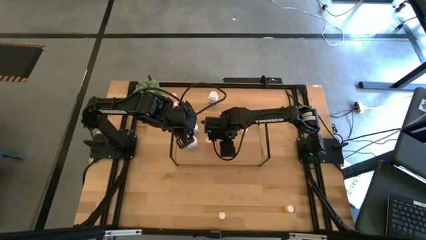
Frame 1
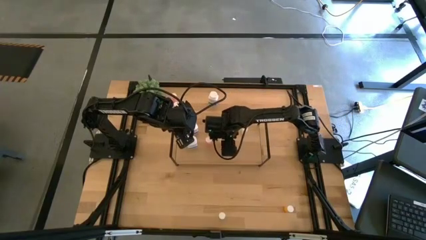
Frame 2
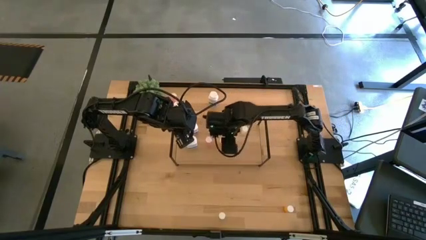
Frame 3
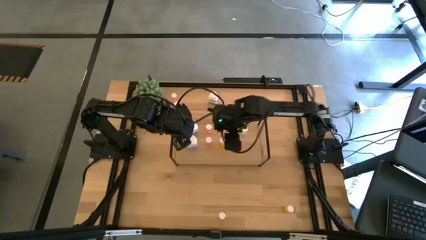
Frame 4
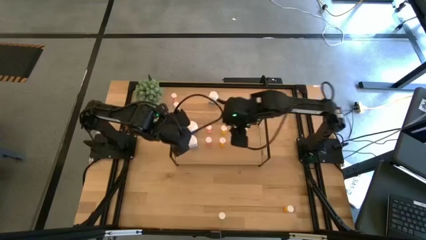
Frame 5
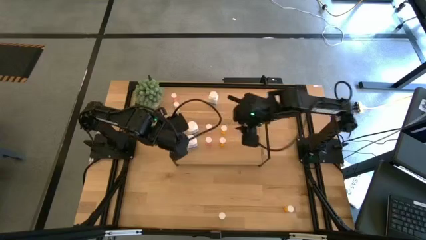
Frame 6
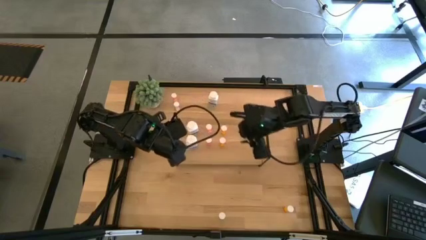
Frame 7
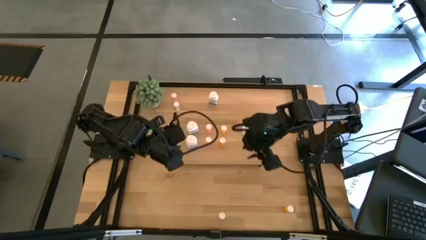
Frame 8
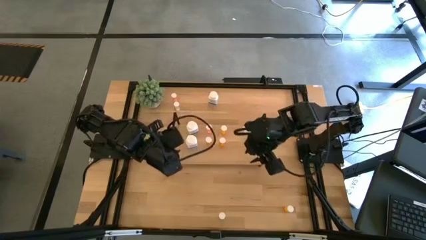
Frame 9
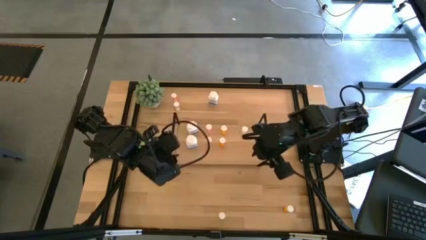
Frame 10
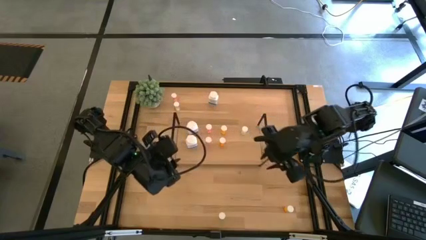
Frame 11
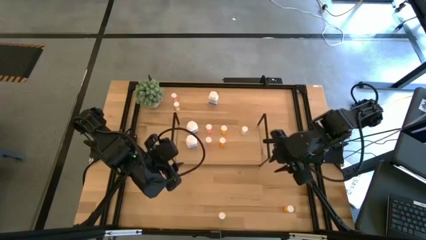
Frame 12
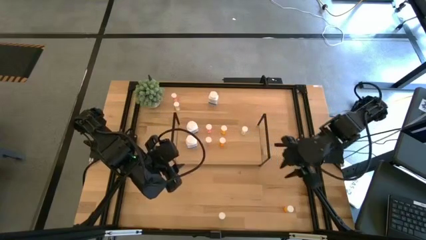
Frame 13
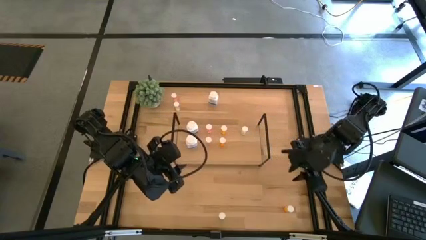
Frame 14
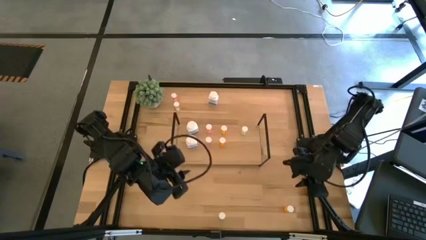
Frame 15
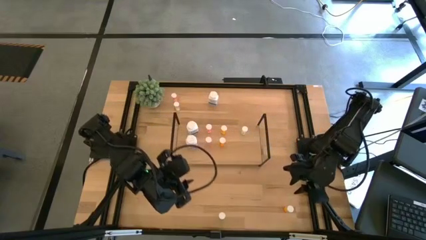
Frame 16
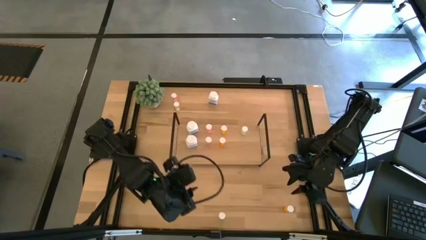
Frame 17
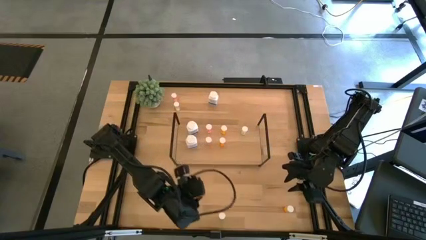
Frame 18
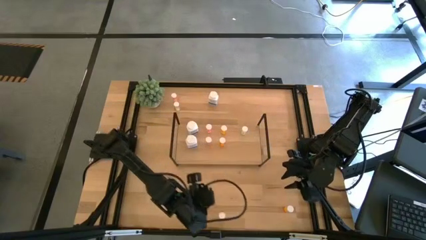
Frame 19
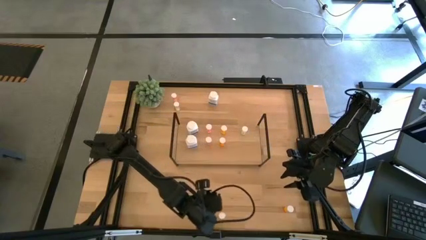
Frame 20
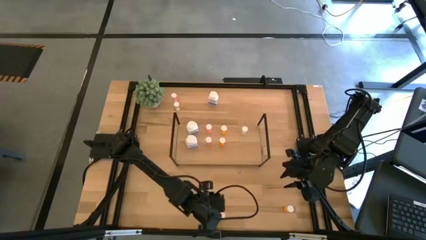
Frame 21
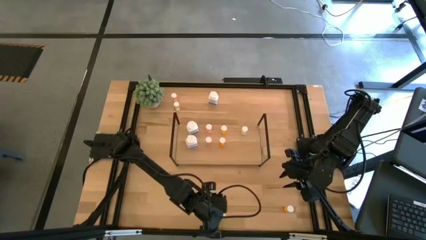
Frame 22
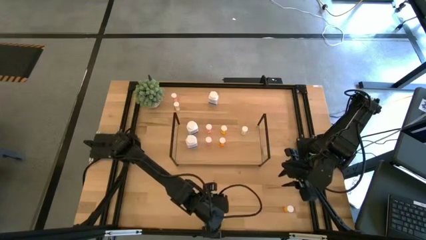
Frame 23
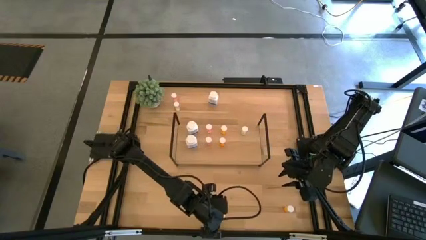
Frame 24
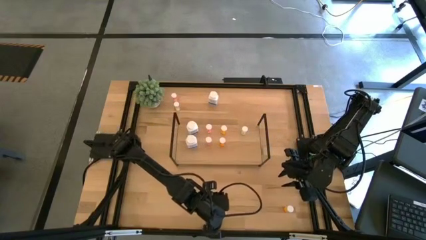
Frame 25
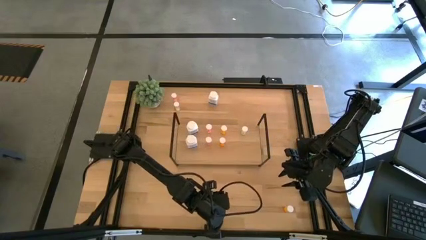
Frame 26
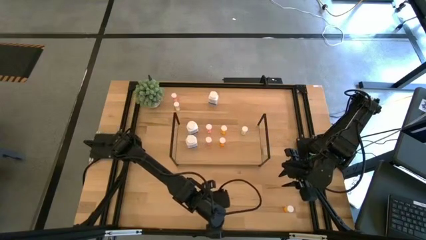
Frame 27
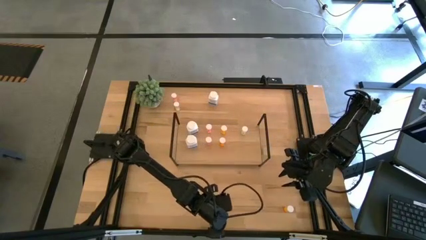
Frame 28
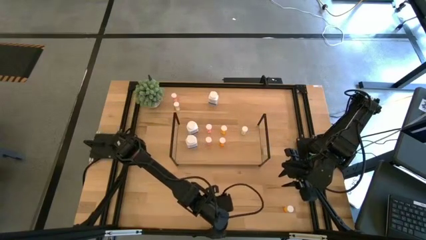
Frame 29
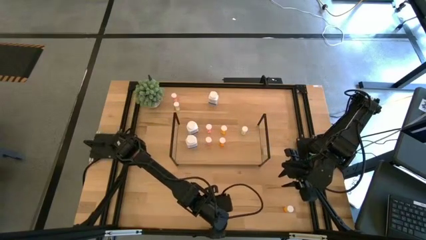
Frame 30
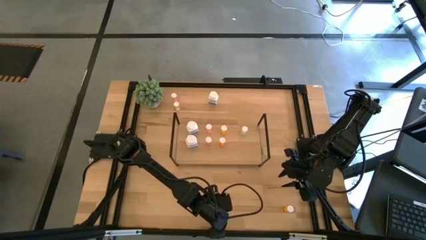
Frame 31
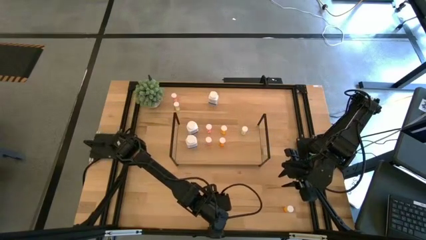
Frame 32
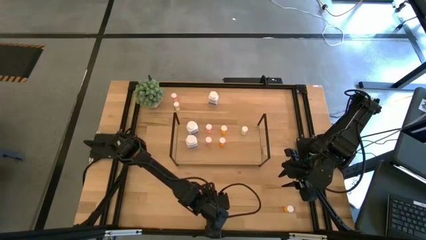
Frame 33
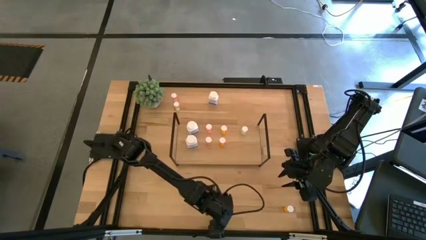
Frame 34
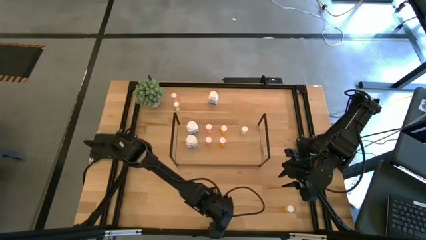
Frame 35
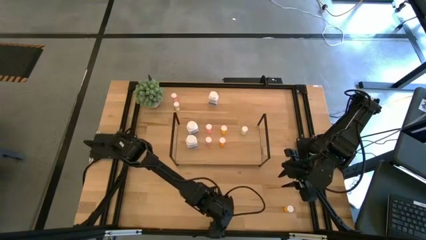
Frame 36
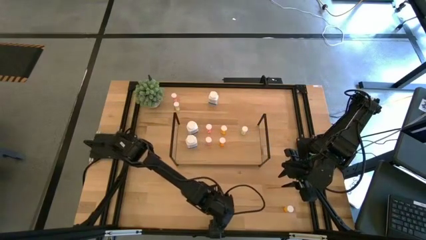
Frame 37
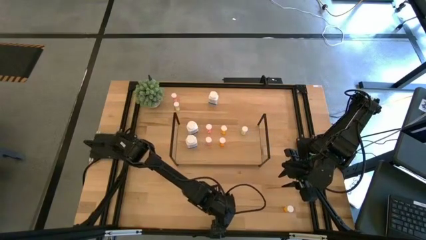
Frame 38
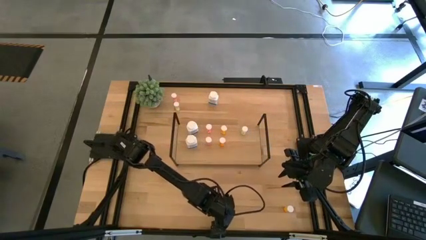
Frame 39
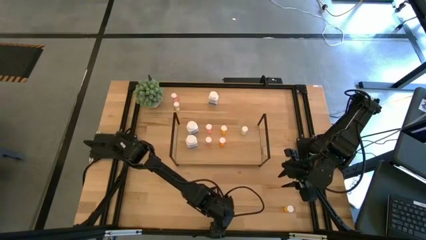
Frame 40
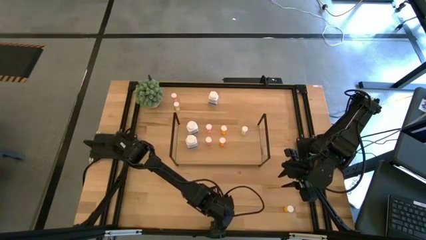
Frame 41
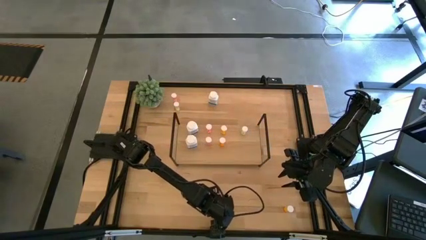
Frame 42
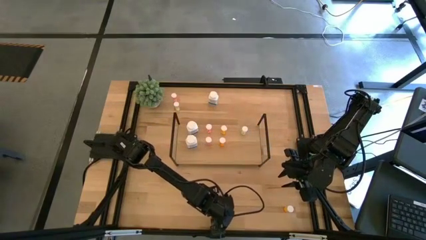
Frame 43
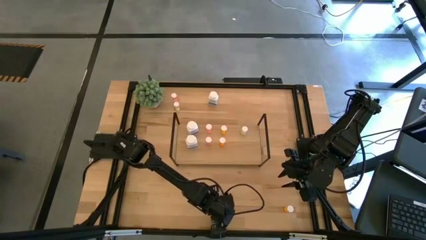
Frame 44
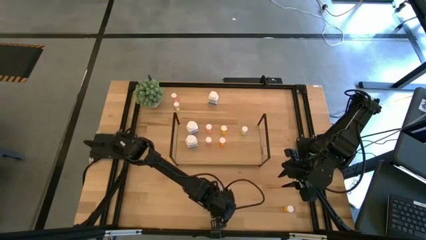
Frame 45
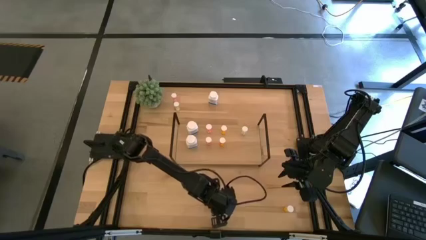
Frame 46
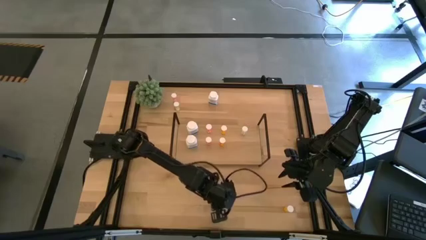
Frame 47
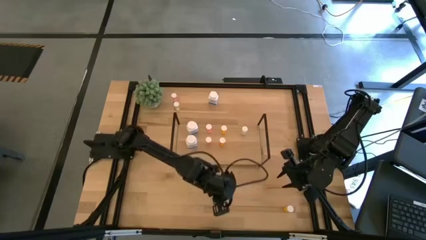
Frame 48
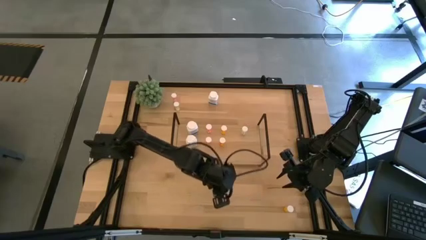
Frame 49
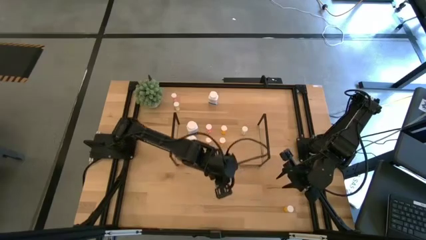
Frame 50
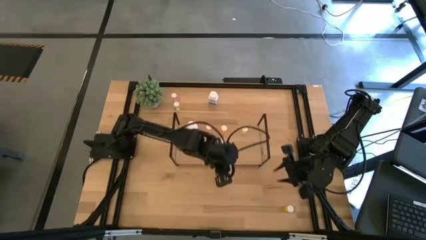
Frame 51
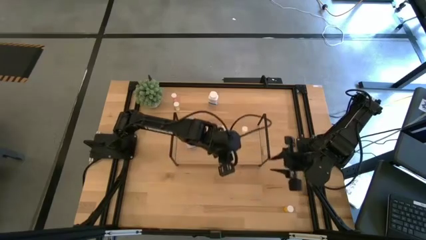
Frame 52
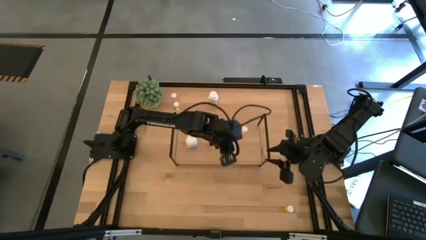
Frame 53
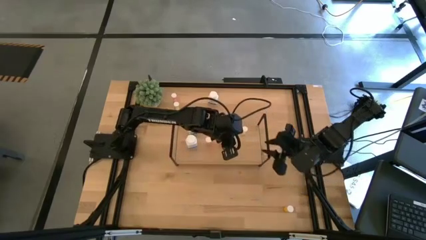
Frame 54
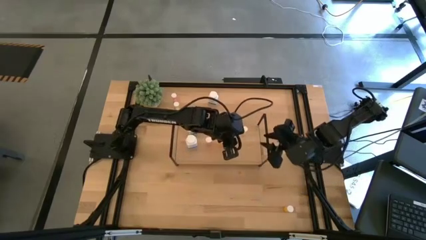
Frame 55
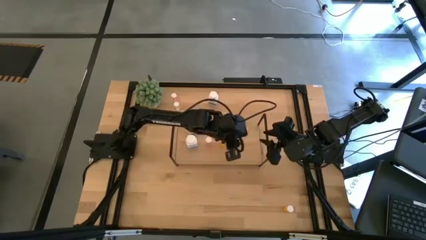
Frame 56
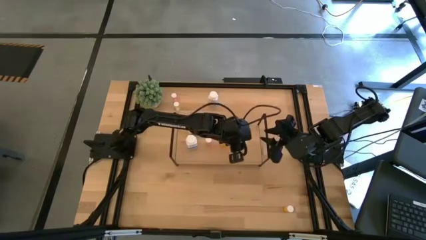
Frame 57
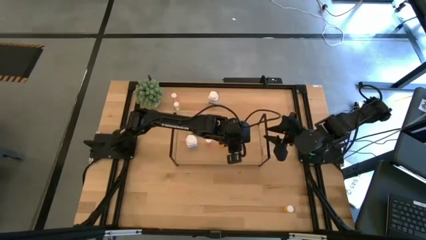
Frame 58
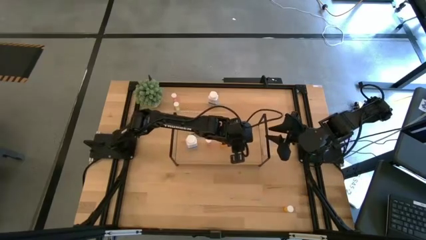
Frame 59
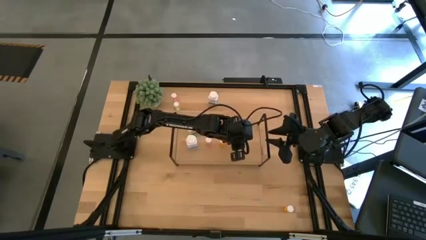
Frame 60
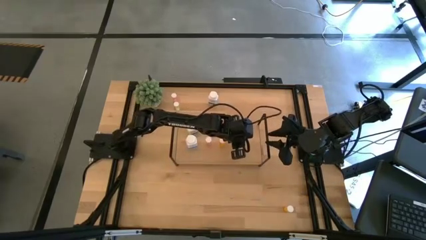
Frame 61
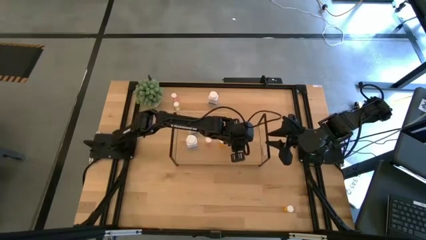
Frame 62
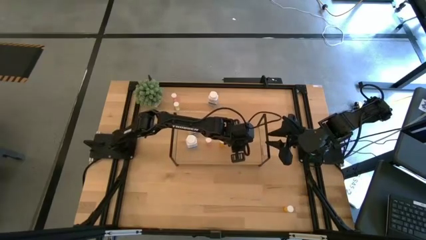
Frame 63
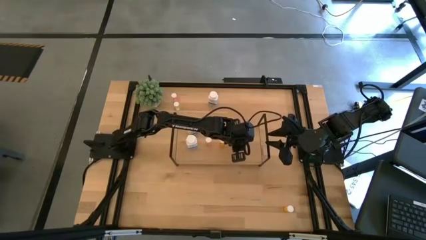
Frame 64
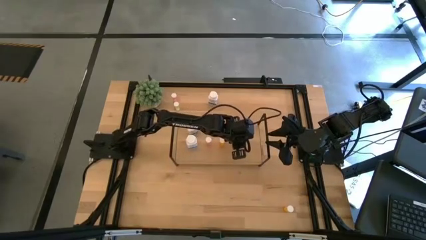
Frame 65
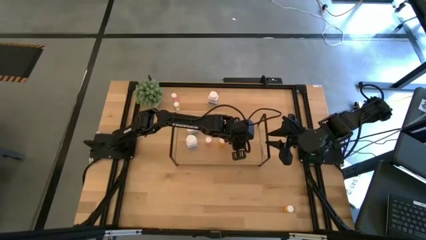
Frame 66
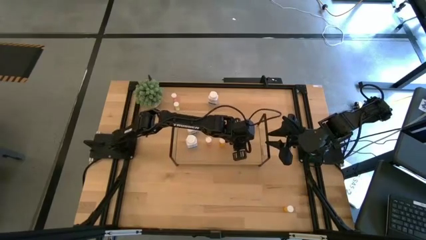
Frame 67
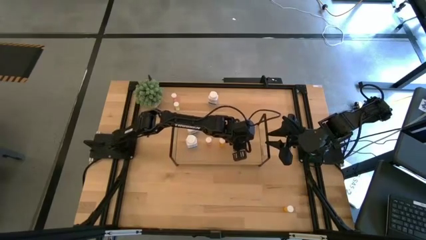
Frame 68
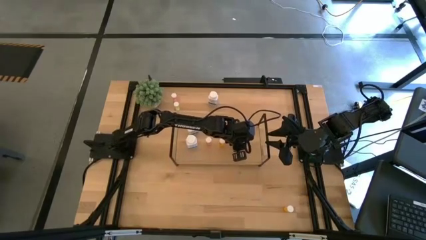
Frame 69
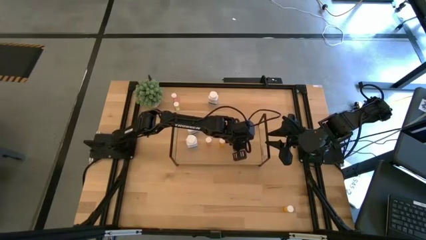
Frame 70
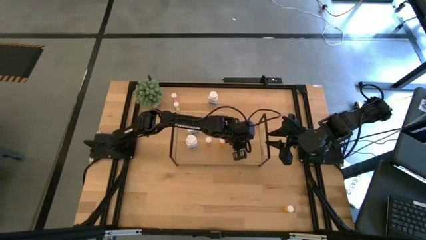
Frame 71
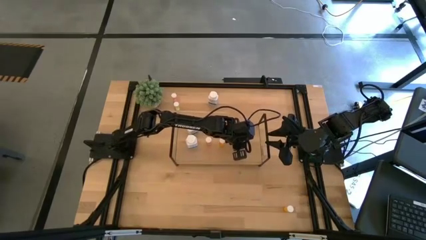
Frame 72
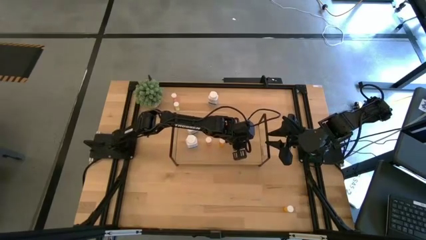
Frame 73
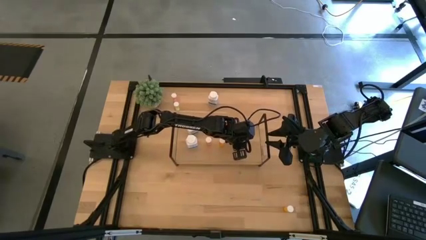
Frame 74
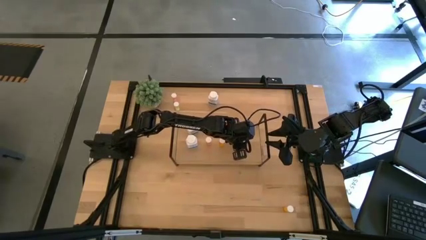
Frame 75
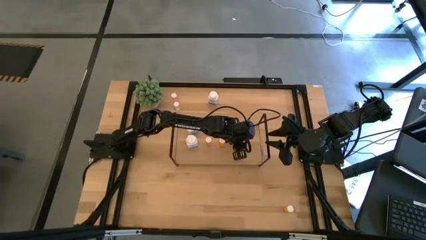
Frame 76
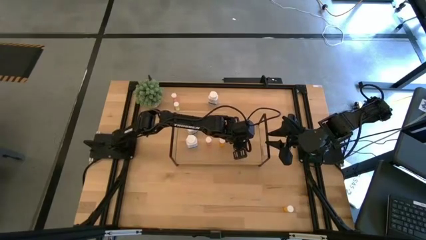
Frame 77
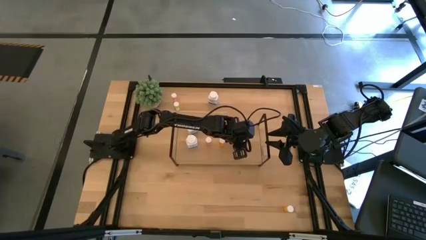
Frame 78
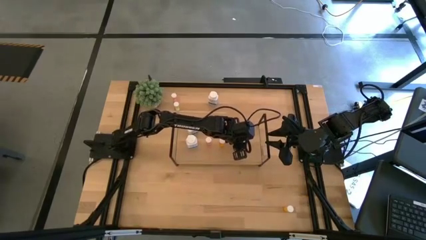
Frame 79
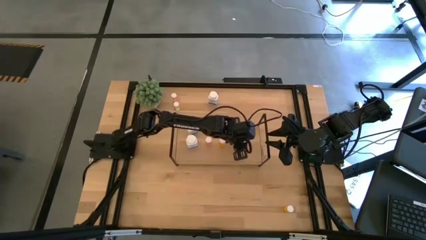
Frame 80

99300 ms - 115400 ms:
Task: Pick and place medicine bottles onto shelf by color
Put the bottom yellow pill bottle on the shelf aligned with the other yellow pill bottle

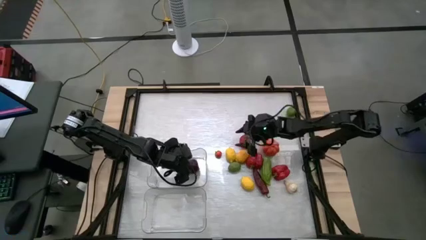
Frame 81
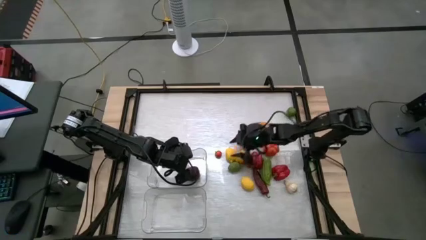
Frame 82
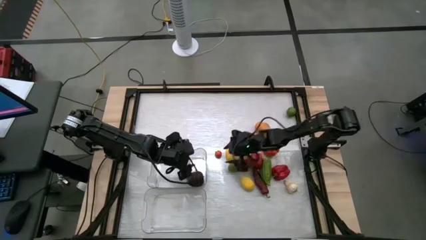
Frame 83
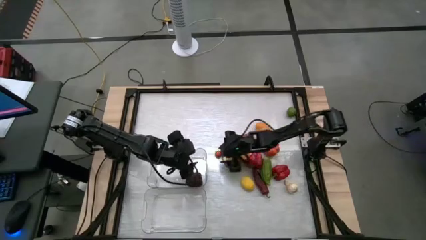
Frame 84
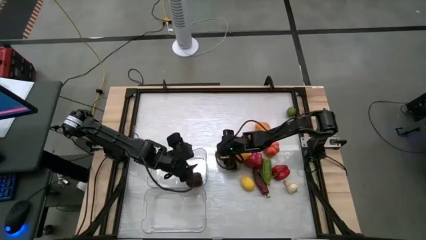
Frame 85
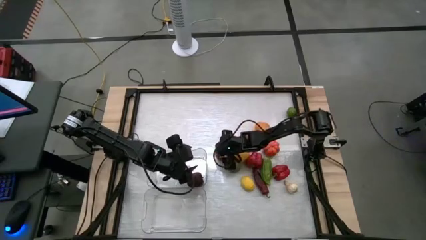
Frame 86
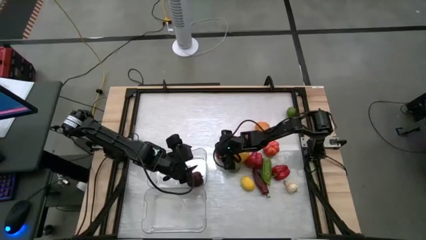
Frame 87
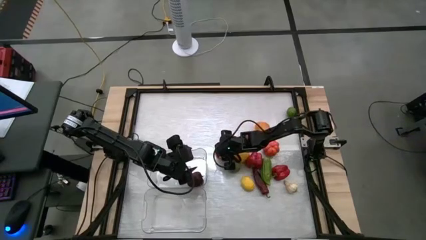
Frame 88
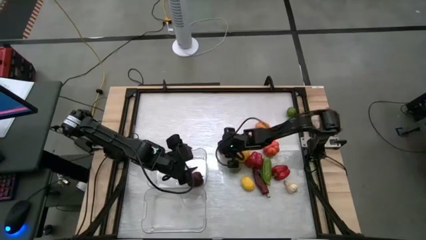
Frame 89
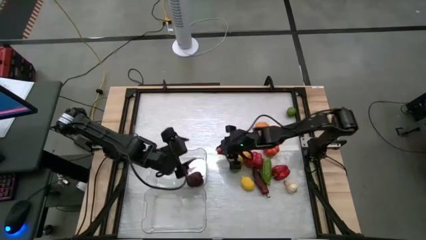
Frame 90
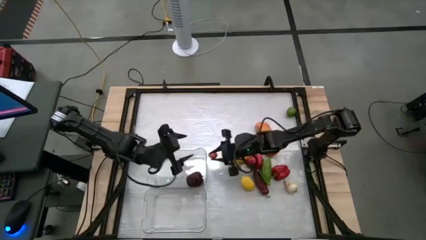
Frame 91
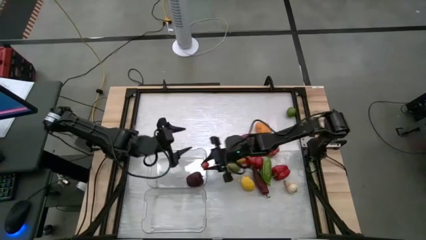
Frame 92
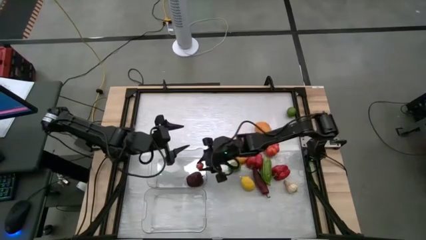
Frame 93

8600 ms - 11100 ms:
Task: Sort produce into baskets
Put the tomato into the top transparent bin
